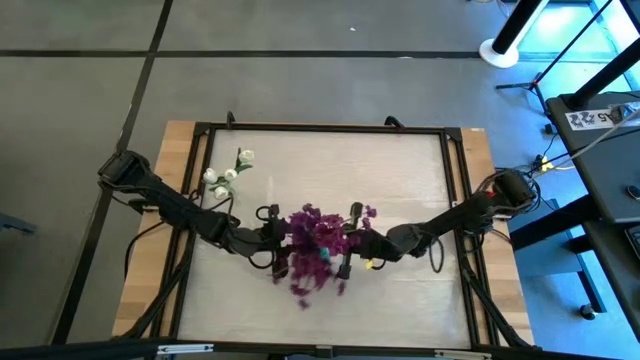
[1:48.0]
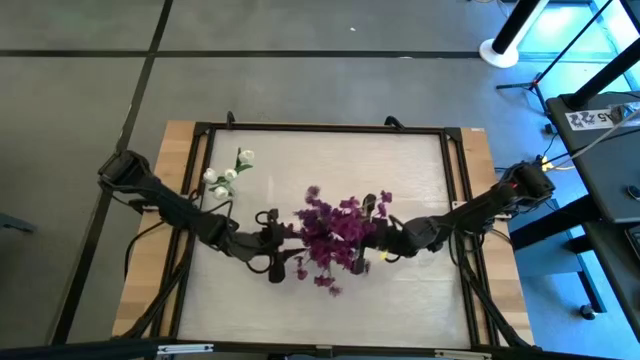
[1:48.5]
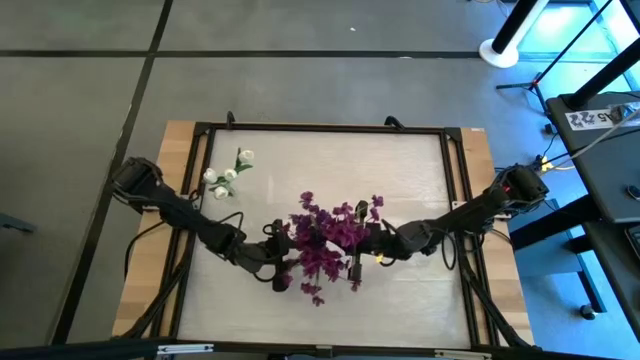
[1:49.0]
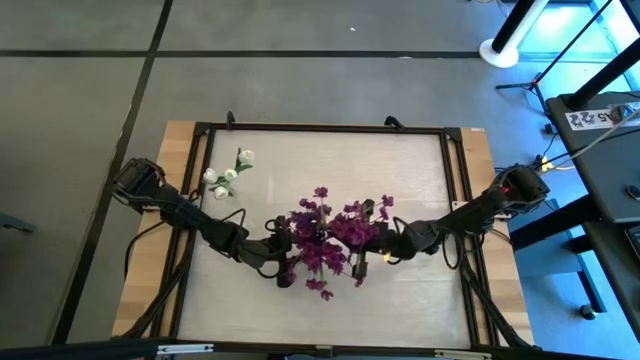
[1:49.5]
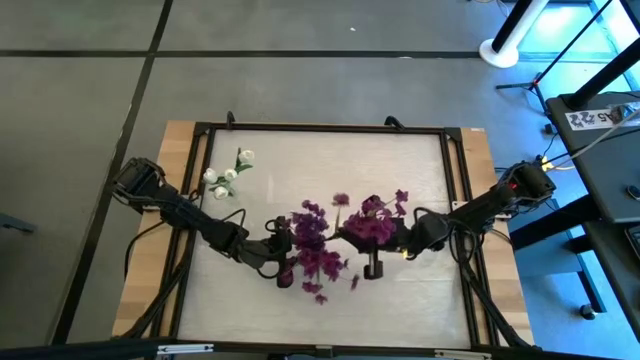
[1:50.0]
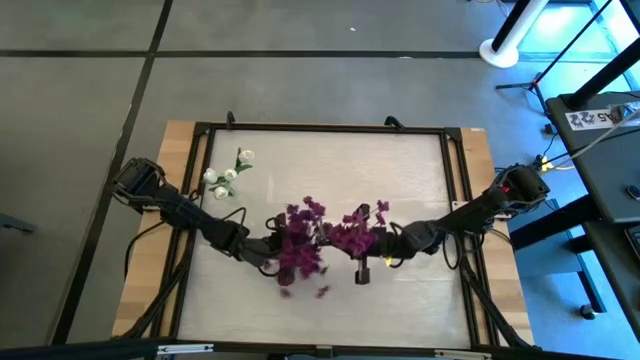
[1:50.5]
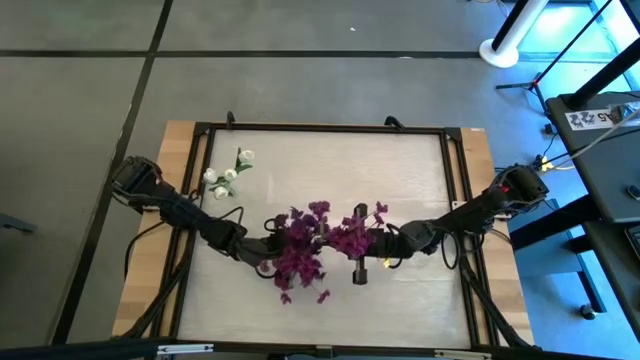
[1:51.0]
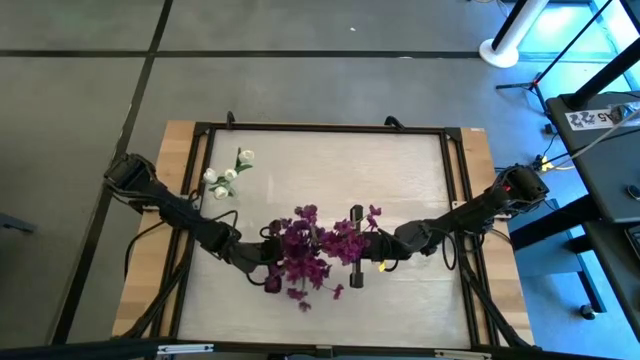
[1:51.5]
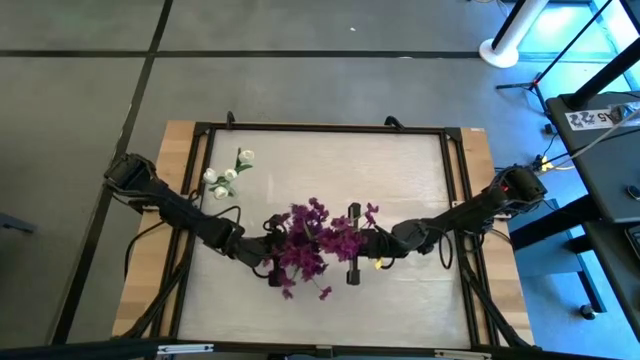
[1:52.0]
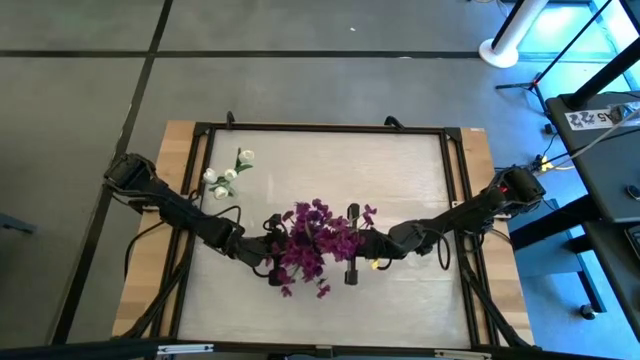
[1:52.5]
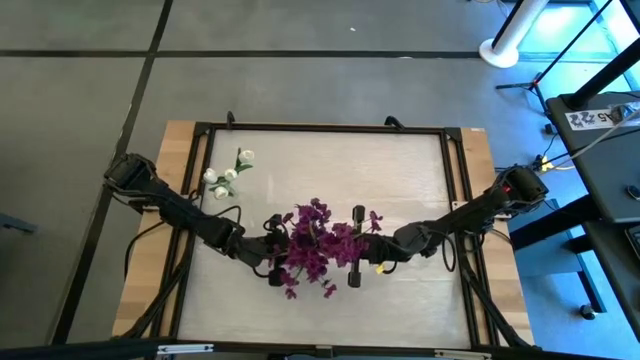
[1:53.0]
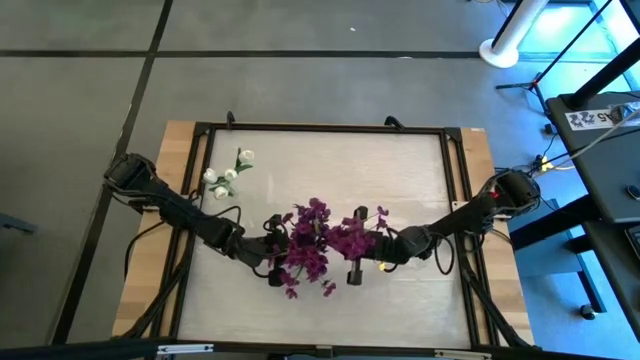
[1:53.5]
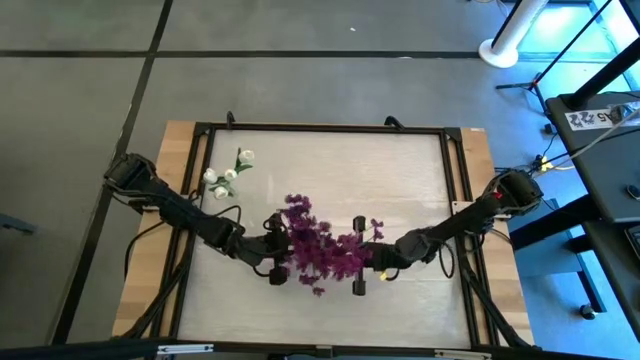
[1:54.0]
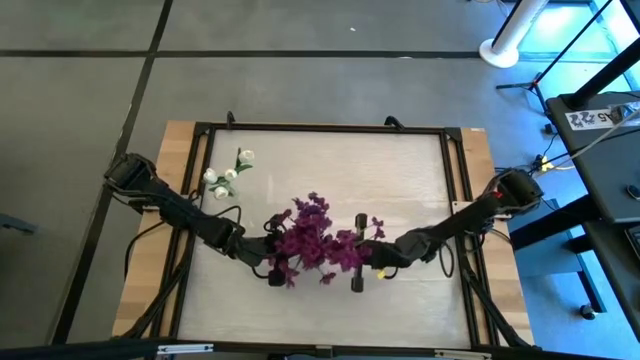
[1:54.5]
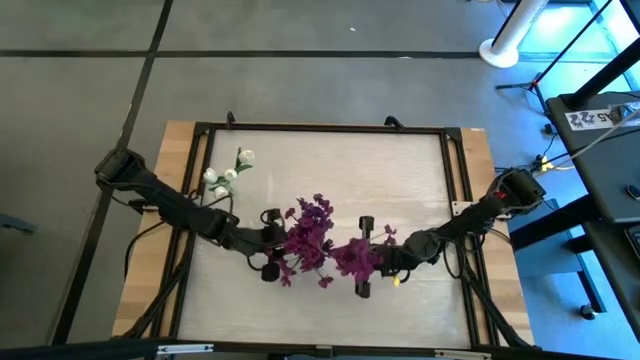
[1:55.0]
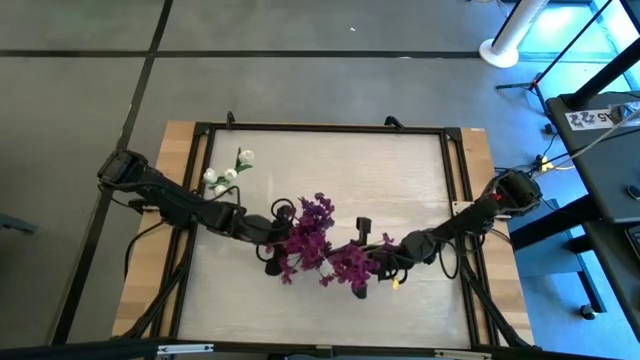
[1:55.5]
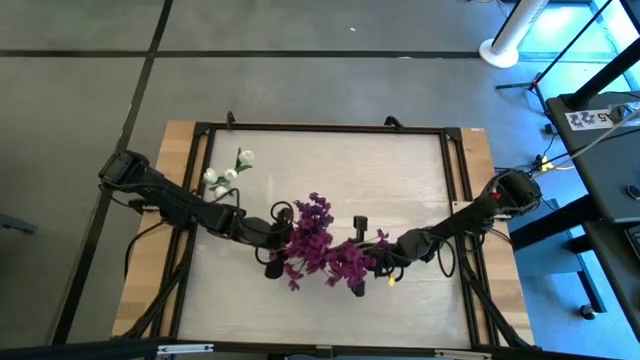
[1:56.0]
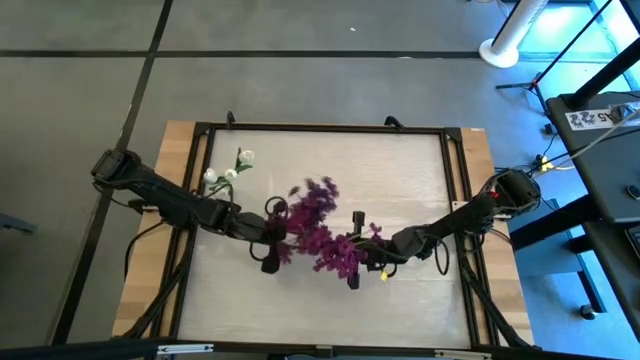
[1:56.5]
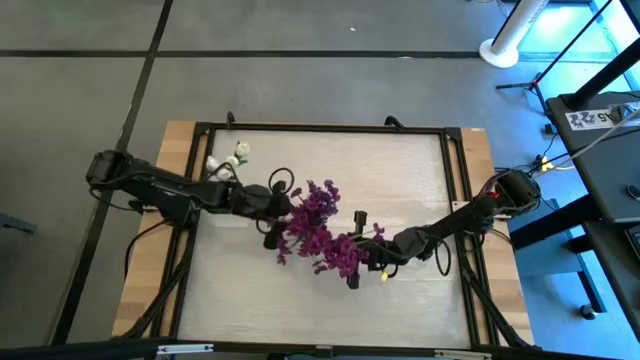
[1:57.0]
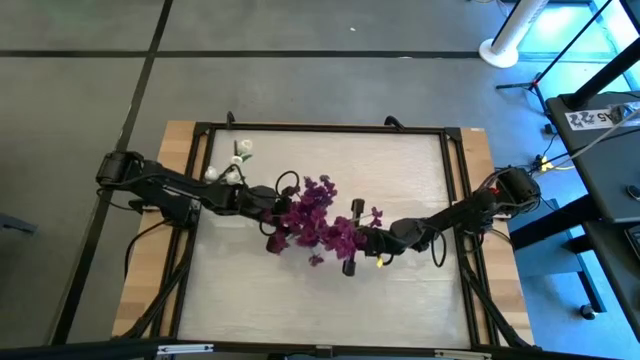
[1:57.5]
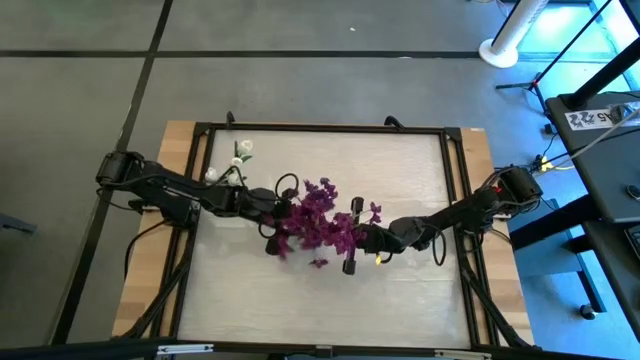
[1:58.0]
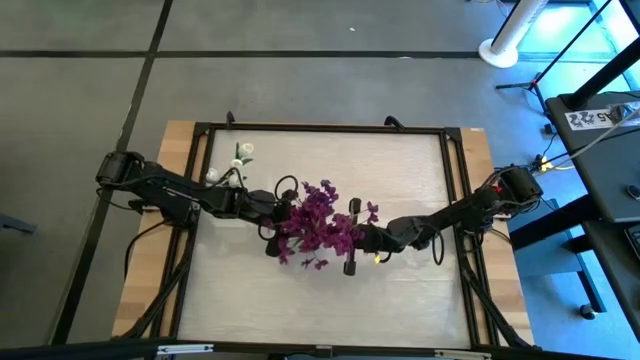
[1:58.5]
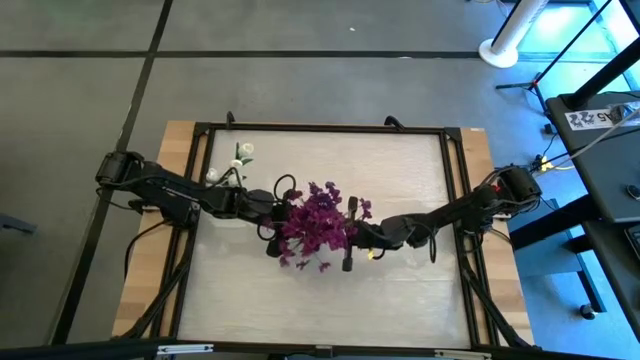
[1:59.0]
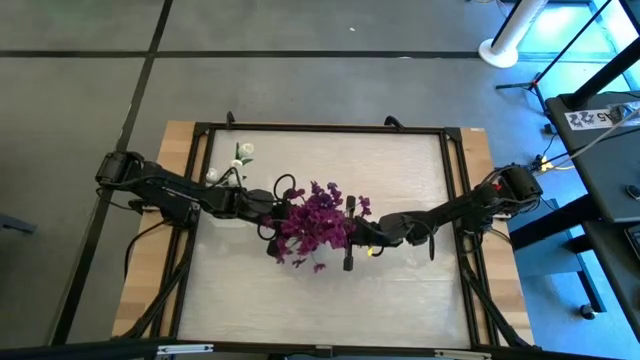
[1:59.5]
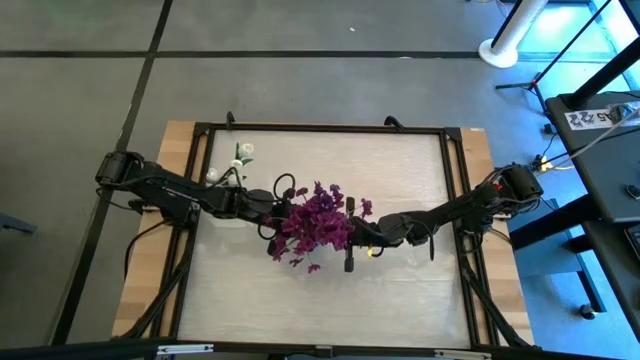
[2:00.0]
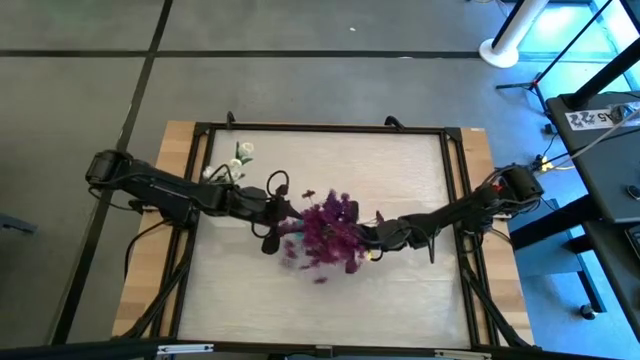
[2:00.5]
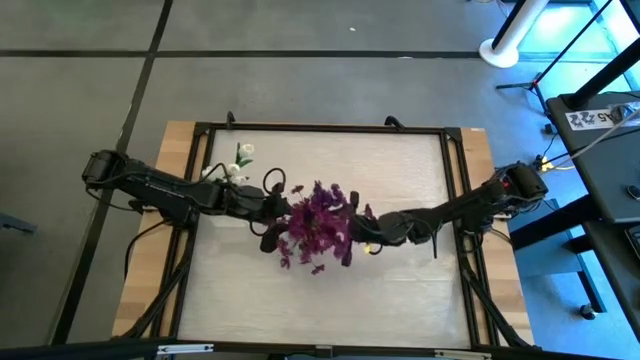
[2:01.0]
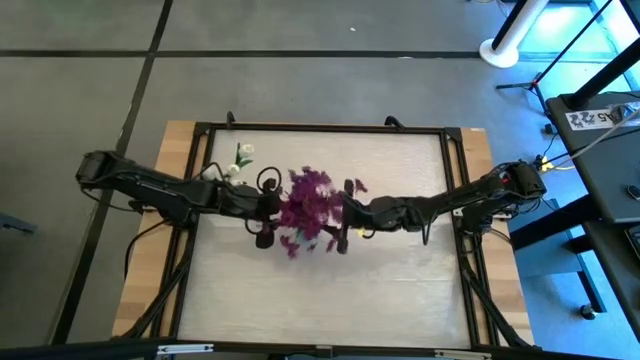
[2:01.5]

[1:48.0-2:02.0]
Task: Sort flowers into vase by color
Put the violet flower into the transparent blue vase

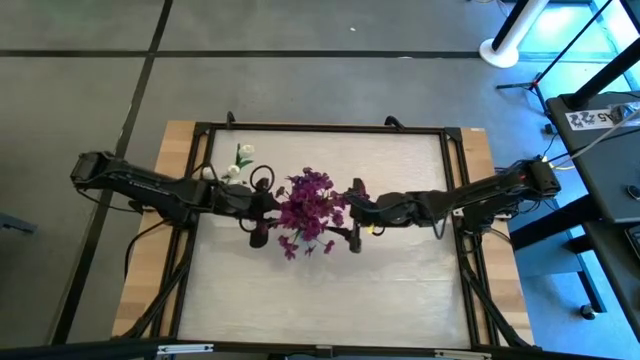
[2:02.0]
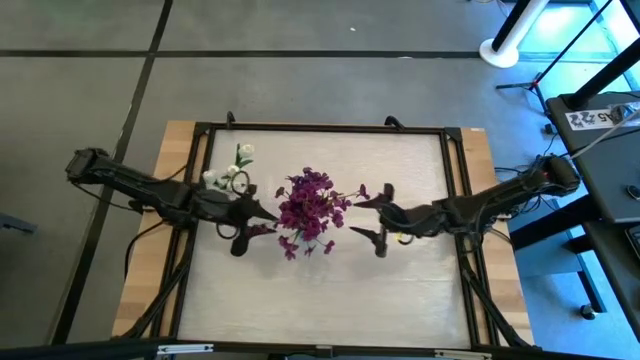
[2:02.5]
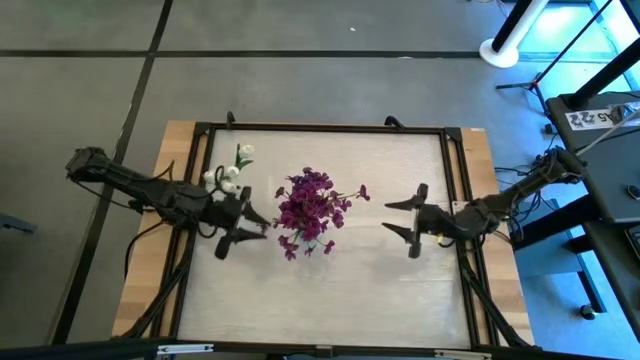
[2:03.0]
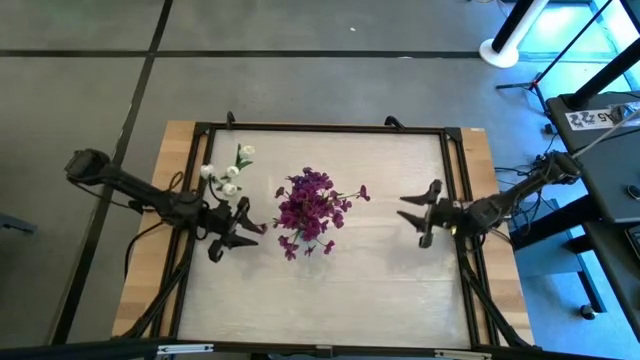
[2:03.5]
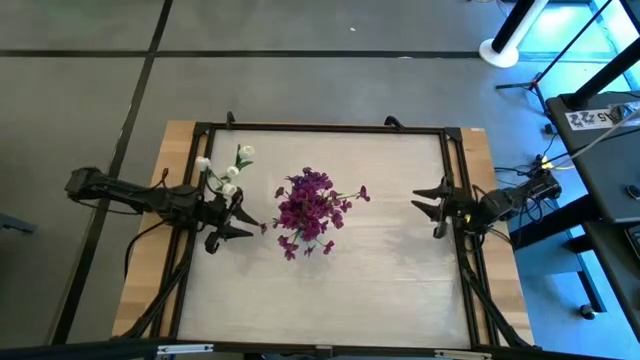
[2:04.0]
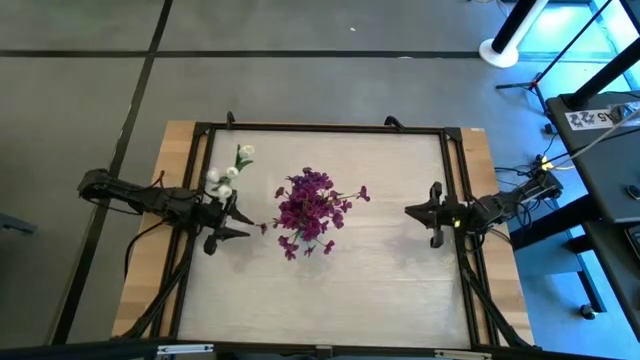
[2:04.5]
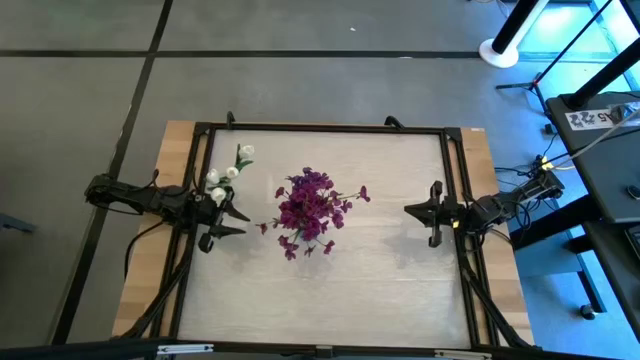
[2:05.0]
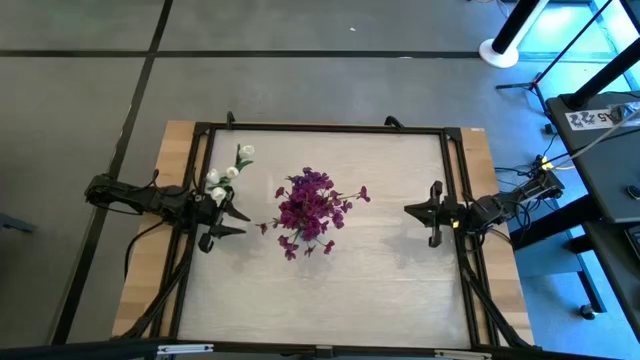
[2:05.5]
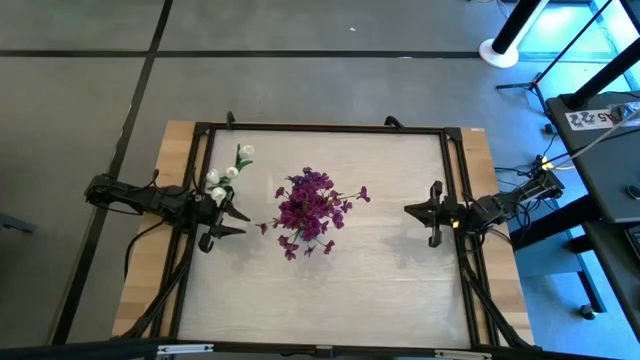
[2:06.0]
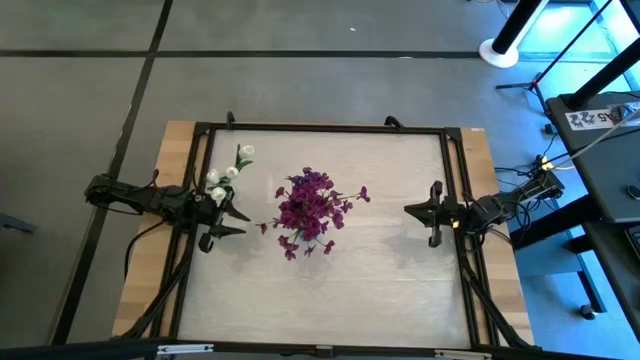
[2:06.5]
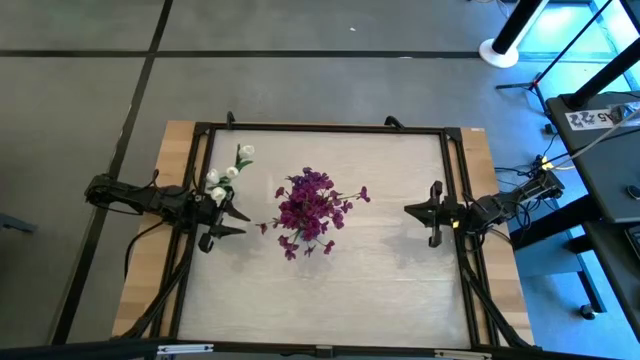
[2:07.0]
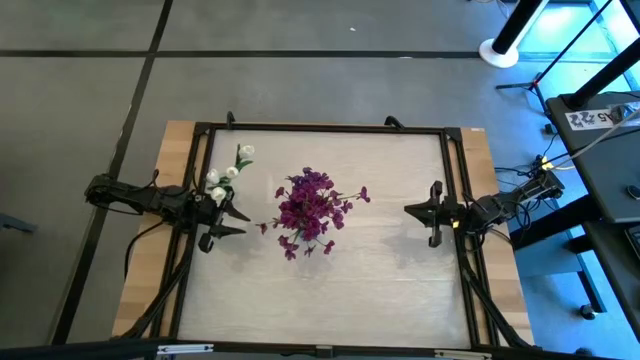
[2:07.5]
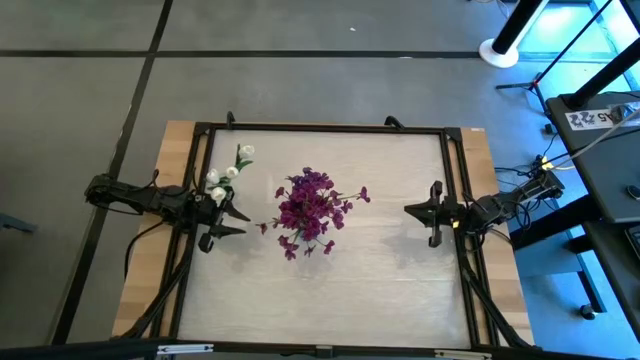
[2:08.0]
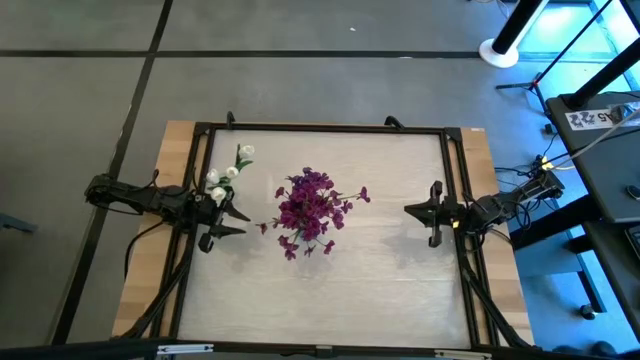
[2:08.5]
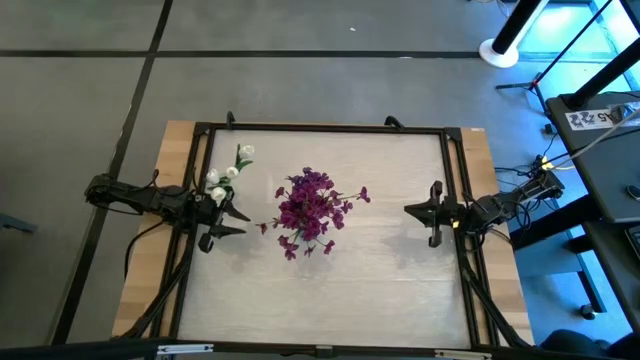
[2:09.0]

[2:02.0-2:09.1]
Return to Home Position
